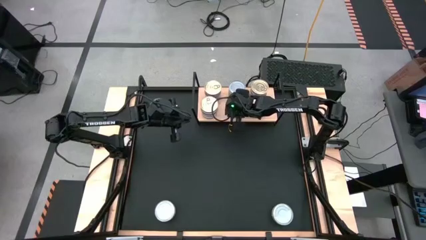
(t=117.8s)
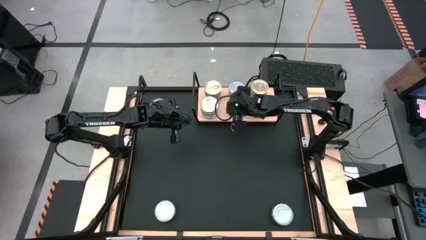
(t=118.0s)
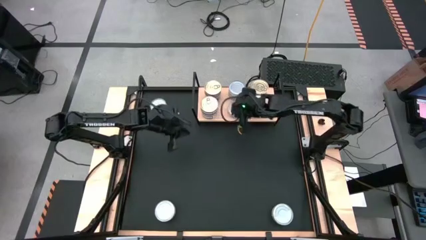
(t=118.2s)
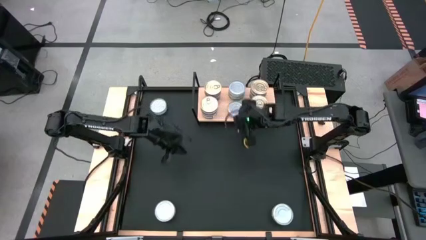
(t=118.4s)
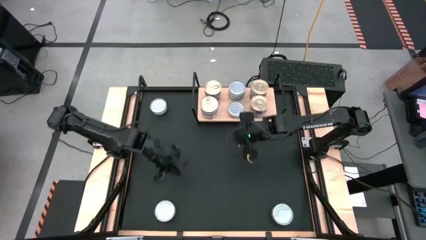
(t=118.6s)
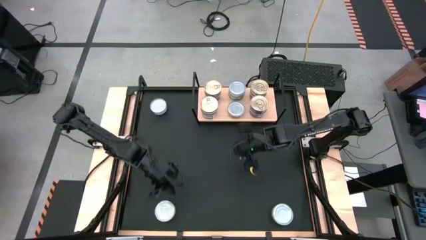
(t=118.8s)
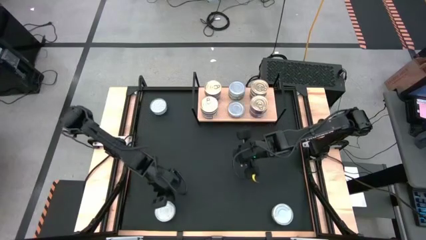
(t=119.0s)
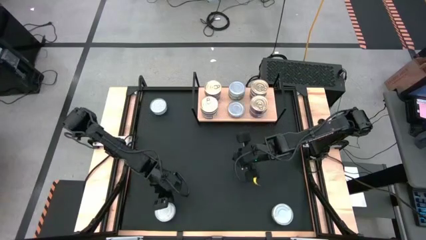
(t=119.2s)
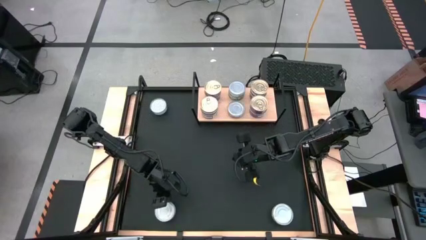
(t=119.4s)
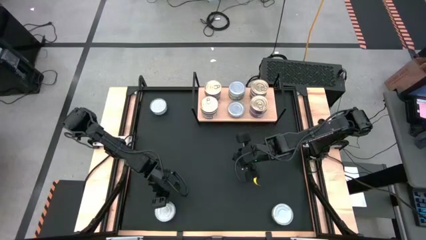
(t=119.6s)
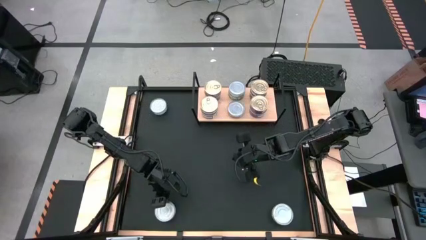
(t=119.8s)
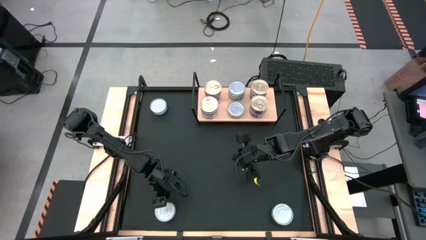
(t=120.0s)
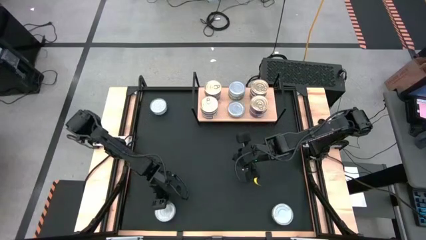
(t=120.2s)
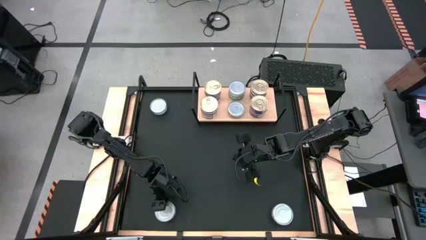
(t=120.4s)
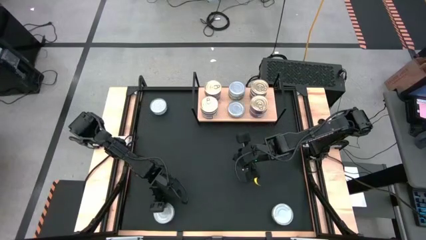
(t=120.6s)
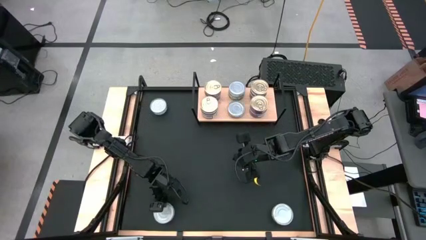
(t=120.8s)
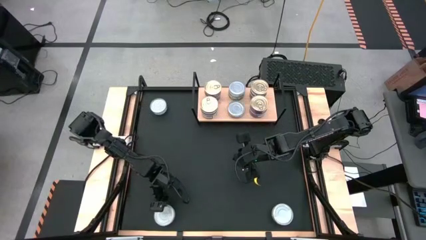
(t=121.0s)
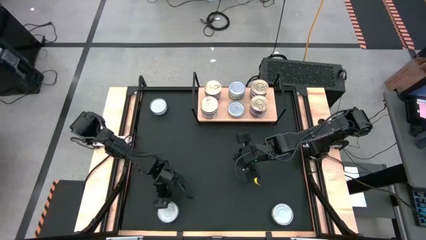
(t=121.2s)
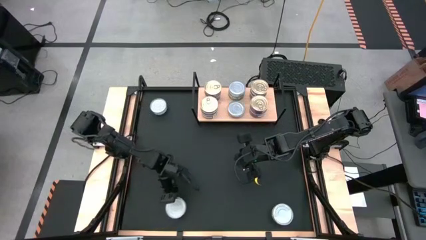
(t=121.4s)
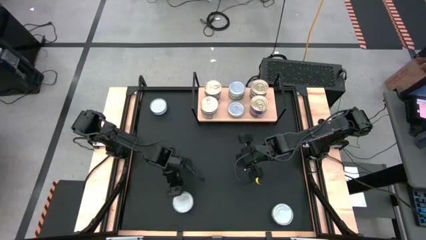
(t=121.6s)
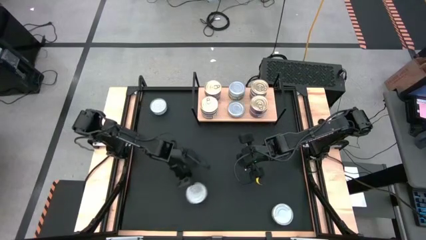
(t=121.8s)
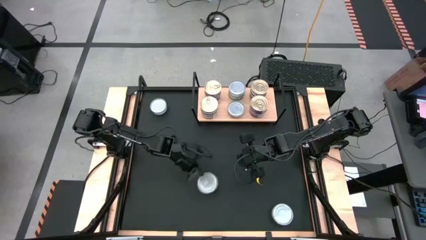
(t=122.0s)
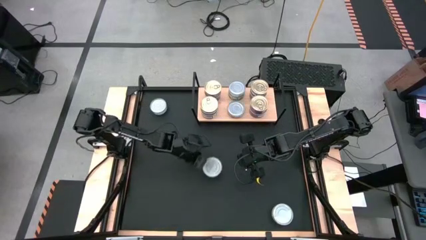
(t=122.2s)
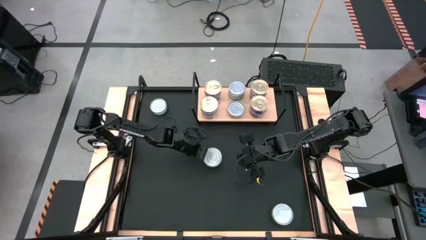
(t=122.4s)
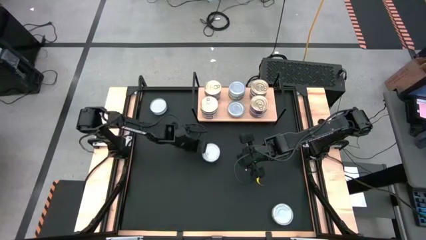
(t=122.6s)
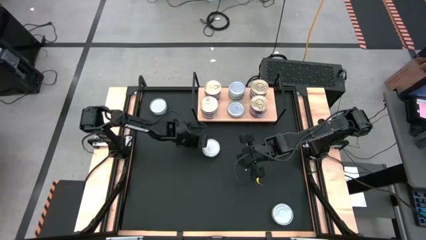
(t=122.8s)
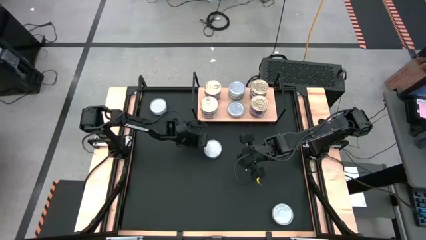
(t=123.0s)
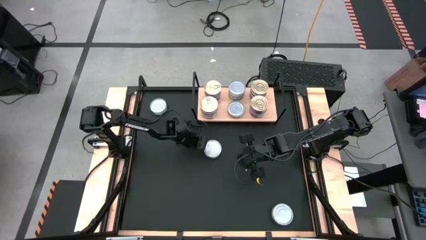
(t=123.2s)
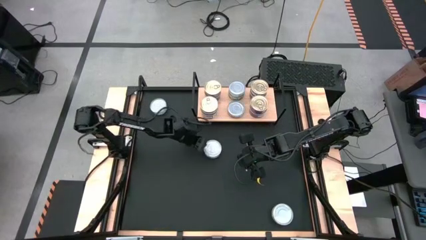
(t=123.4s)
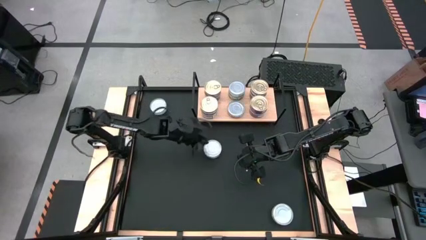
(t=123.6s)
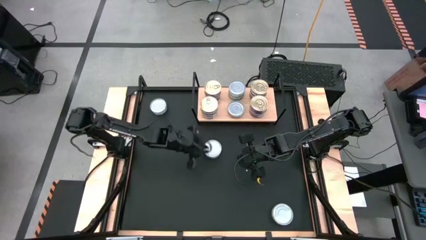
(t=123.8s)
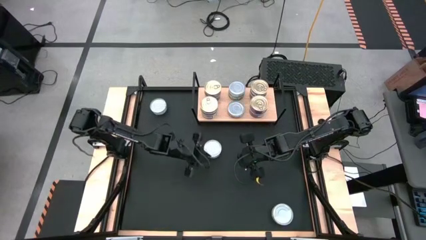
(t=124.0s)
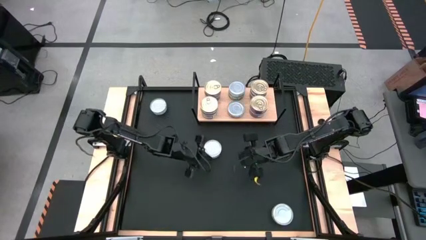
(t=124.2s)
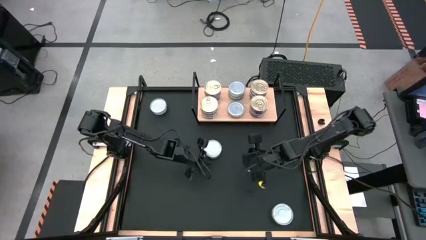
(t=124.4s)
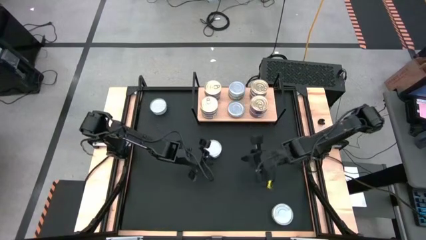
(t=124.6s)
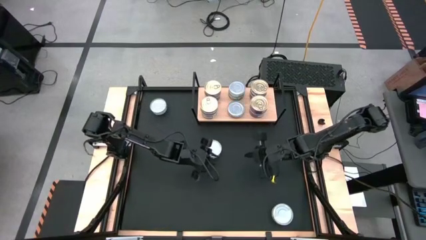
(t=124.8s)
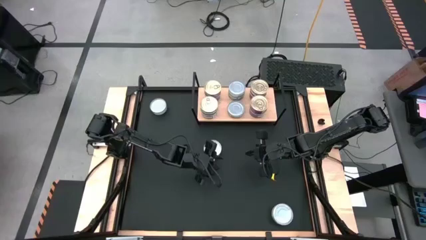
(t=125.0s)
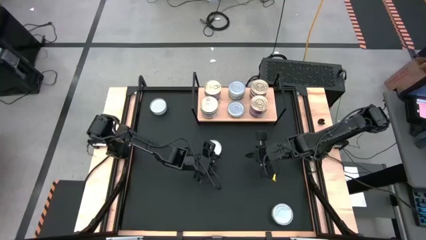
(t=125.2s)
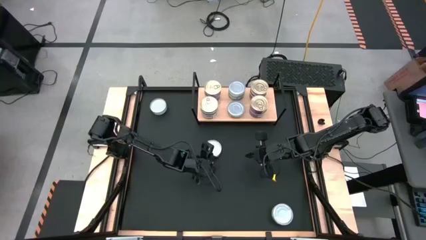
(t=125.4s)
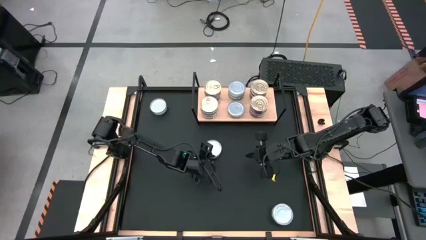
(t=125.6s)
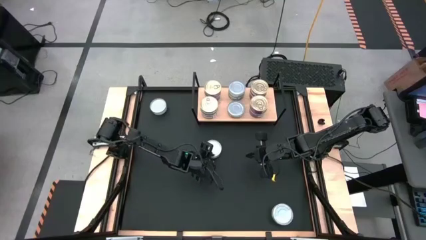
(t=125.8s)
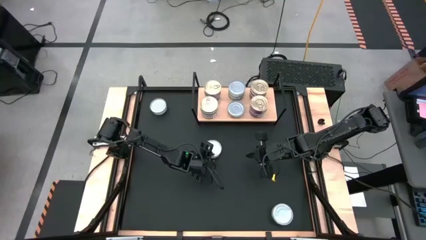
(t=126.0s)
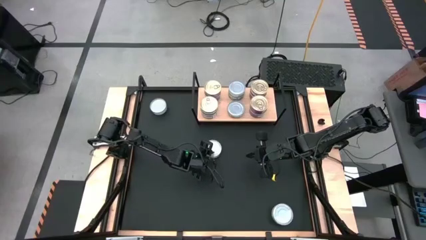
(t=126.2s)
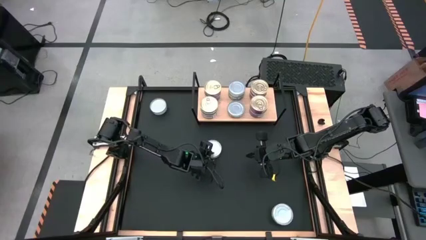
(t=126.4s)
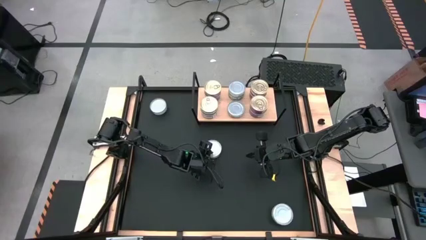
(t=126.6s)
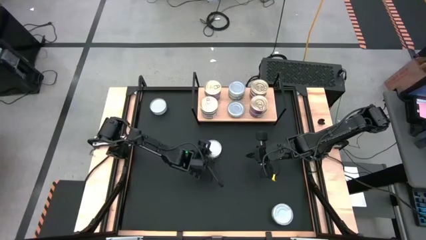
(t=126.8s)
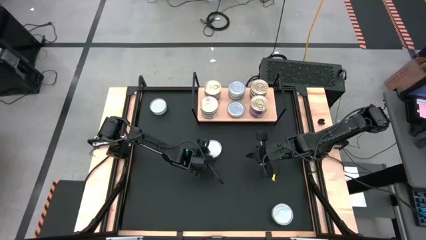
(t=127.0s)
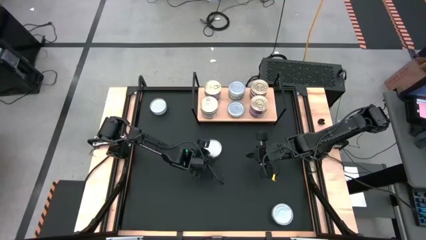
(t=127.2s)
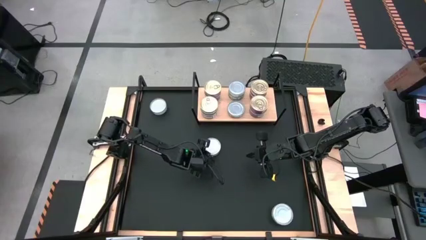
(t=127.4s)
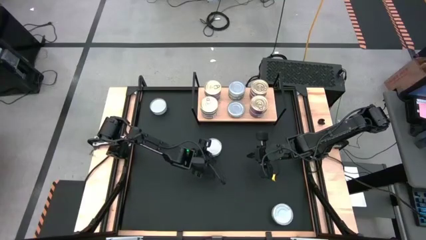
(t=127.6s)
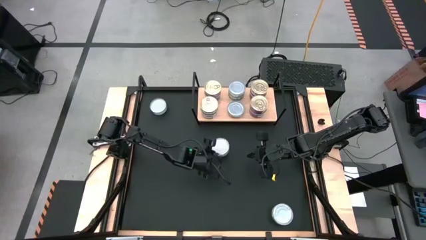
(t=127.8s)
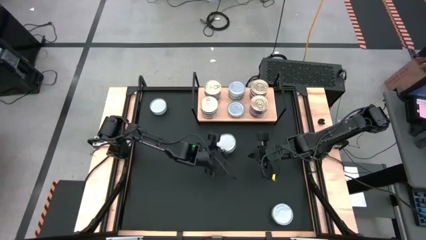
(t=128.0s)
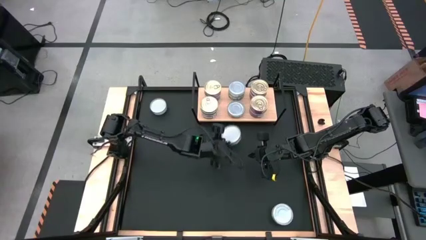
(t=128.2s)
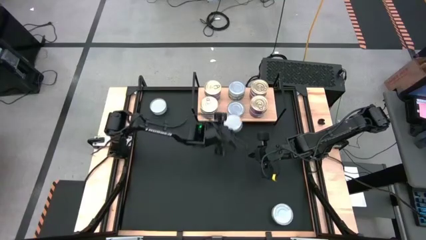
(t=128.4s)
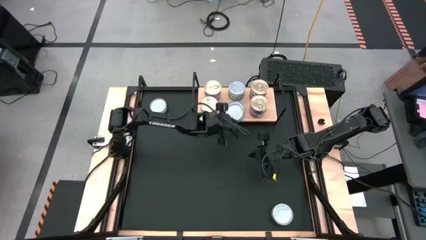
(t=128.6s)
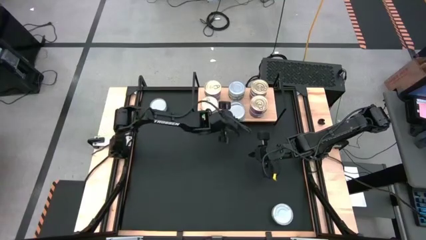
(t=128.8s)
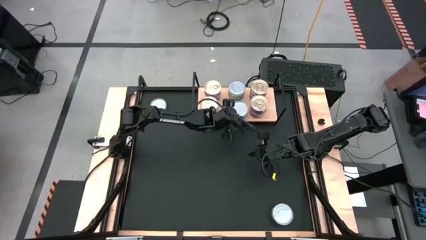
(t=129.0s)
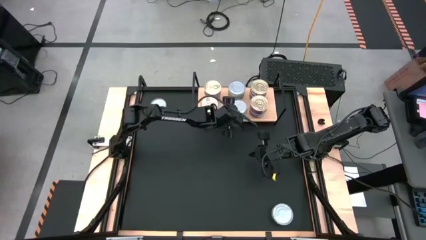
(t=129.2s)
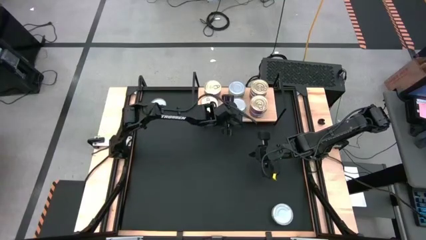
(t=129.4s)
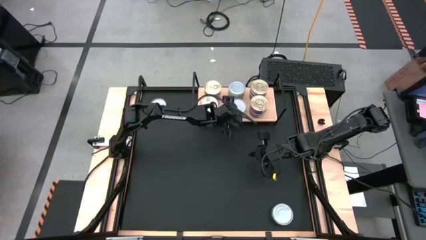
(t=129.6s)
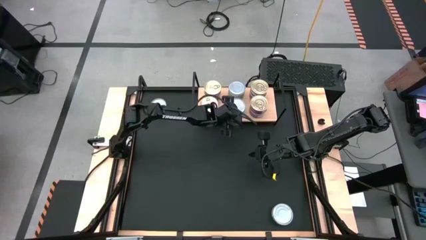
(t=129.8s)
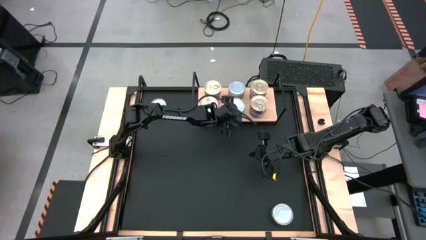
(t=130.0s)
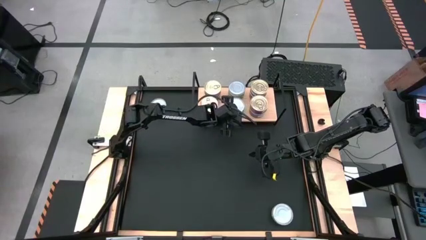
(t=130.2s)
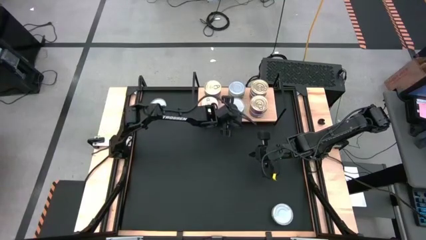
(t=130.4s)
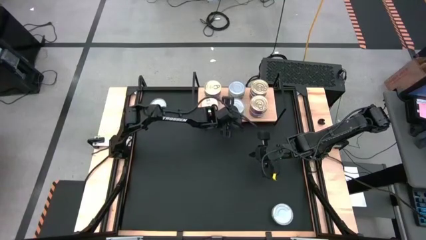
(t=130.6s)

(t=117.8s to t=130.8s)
Task: Stack canned seafood by type on shelf
Stack the green tuna can on top of the other green tuna can on the shelf
